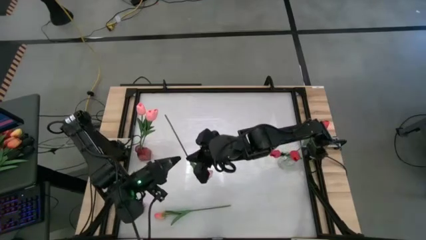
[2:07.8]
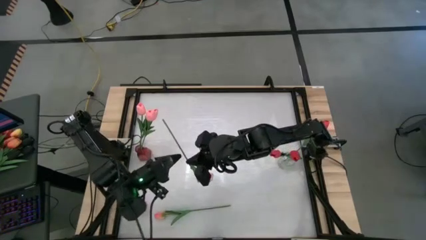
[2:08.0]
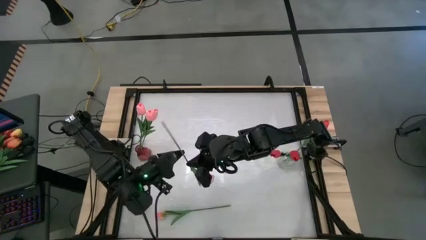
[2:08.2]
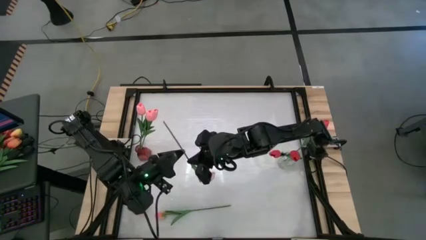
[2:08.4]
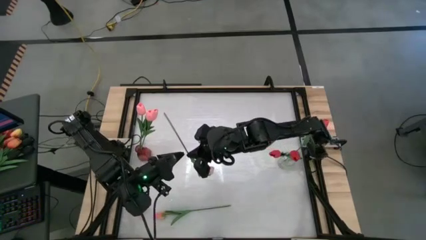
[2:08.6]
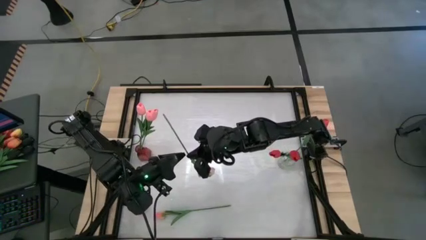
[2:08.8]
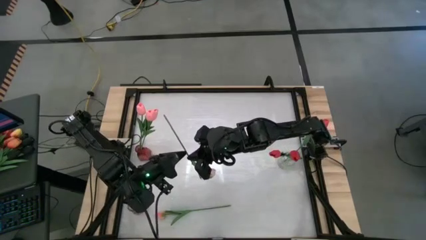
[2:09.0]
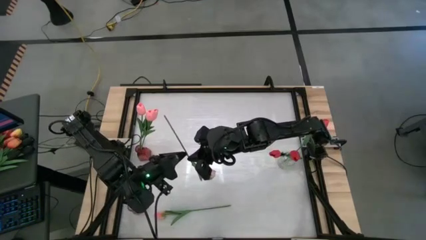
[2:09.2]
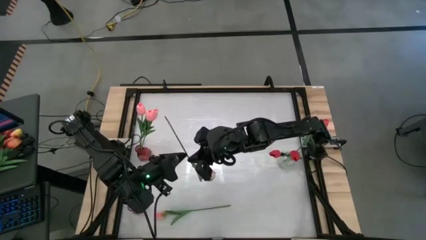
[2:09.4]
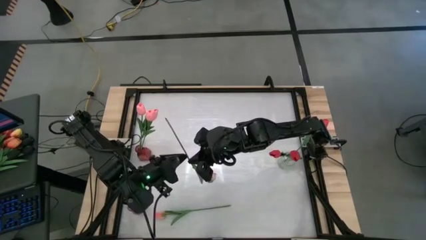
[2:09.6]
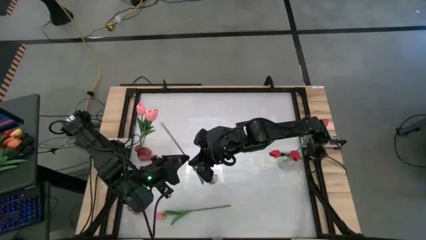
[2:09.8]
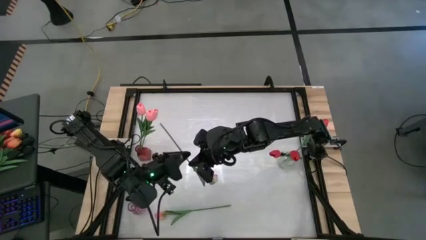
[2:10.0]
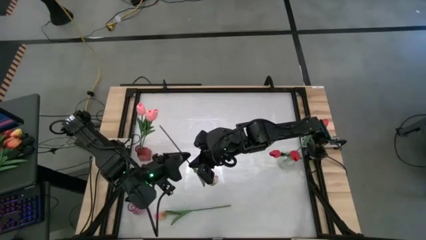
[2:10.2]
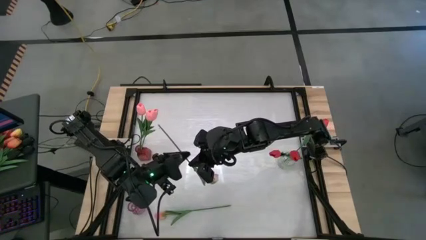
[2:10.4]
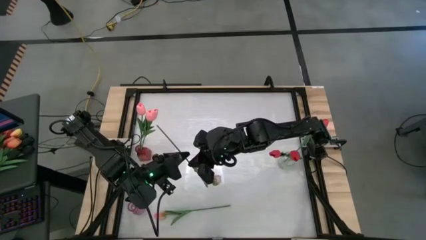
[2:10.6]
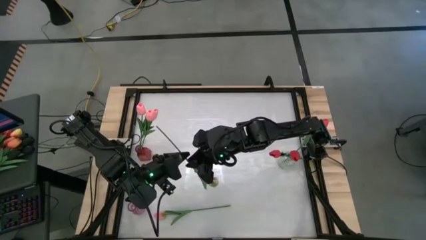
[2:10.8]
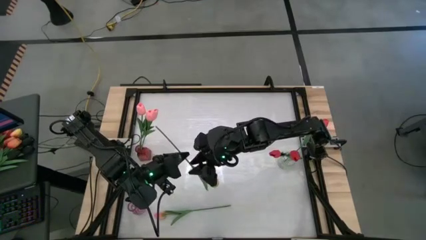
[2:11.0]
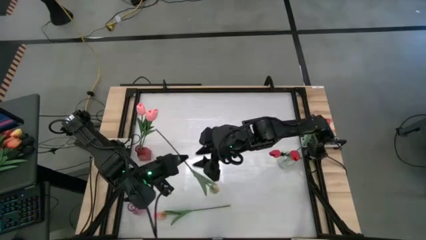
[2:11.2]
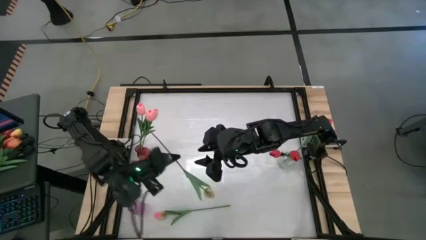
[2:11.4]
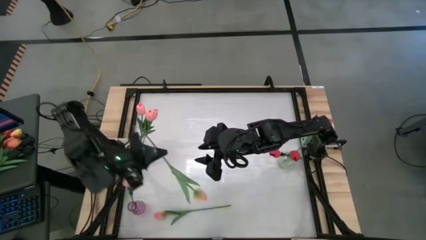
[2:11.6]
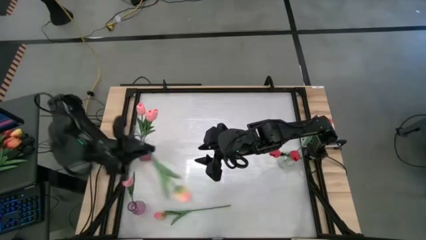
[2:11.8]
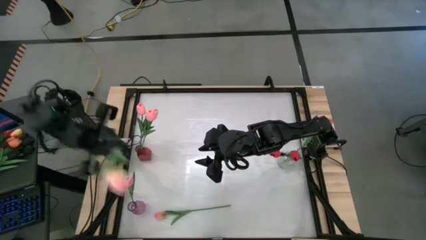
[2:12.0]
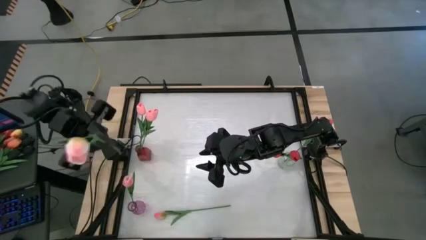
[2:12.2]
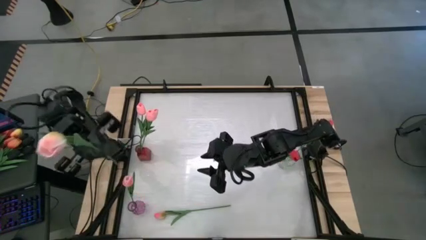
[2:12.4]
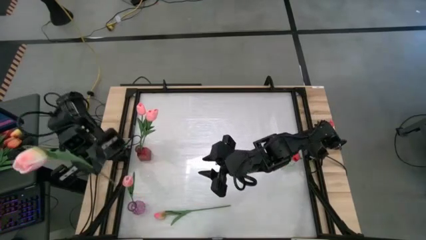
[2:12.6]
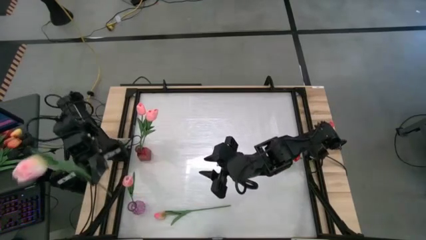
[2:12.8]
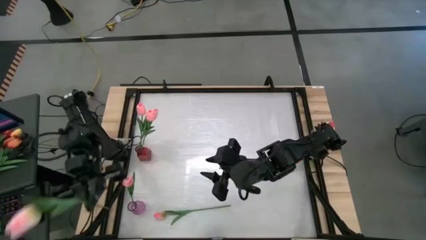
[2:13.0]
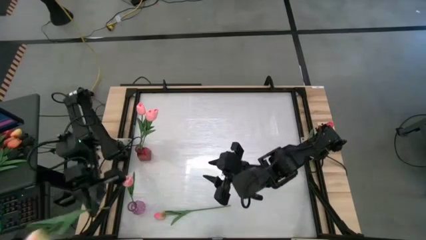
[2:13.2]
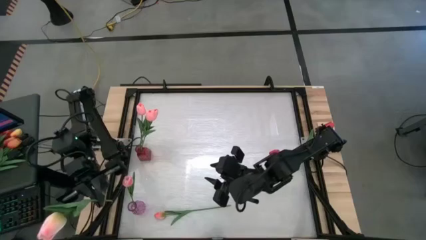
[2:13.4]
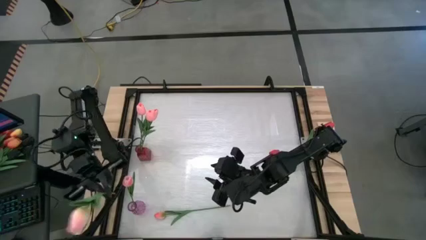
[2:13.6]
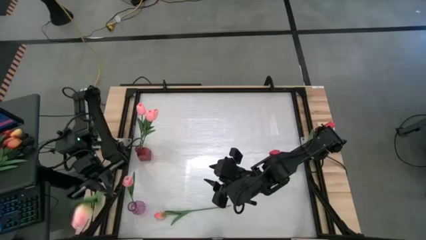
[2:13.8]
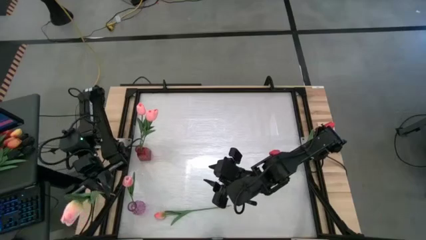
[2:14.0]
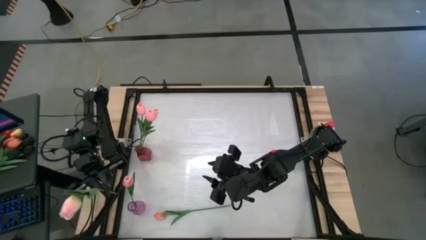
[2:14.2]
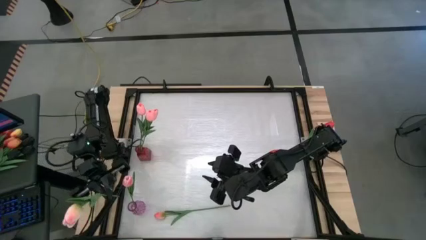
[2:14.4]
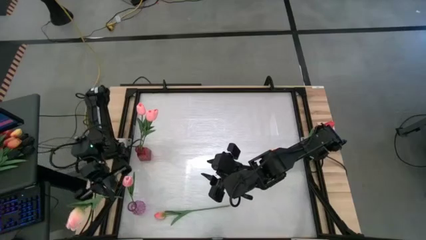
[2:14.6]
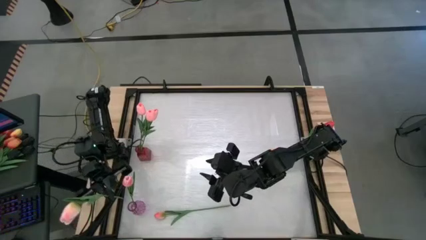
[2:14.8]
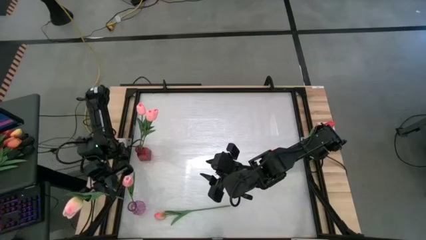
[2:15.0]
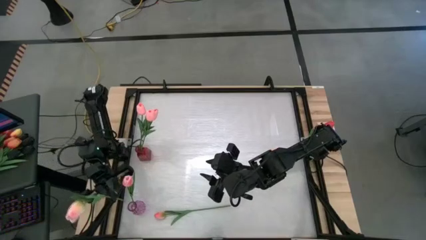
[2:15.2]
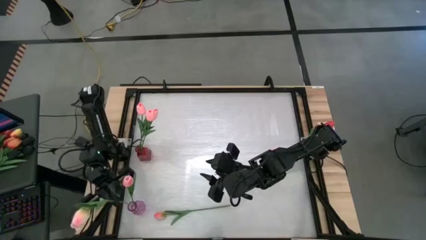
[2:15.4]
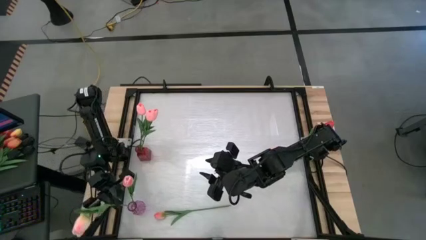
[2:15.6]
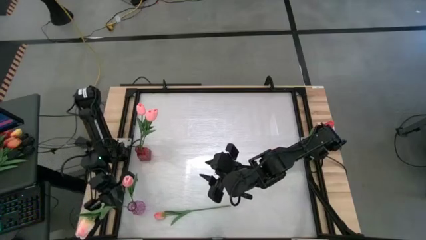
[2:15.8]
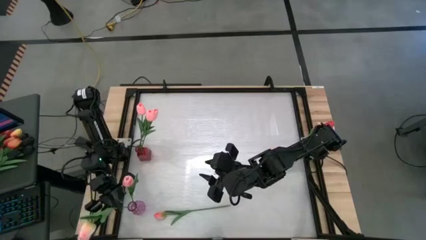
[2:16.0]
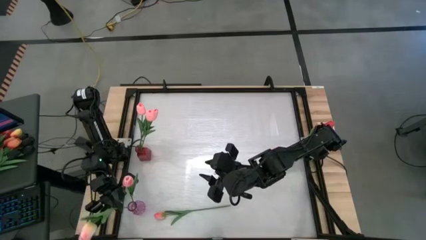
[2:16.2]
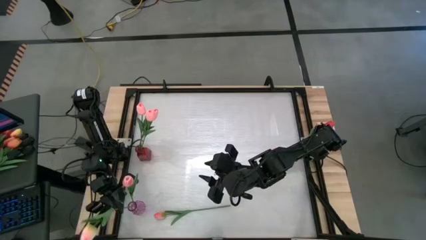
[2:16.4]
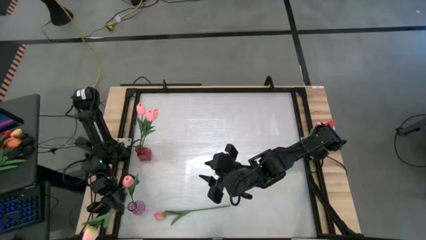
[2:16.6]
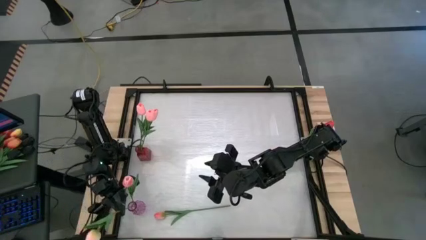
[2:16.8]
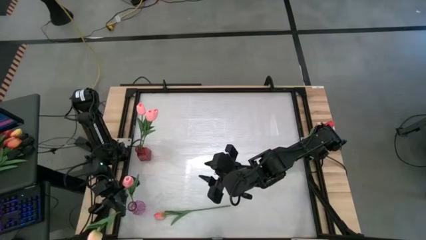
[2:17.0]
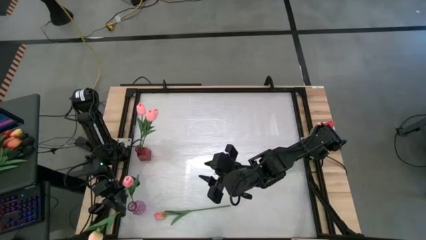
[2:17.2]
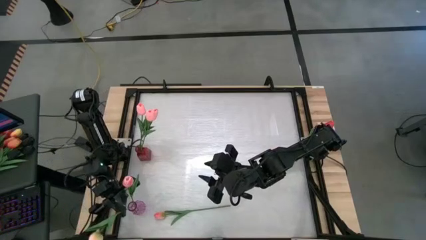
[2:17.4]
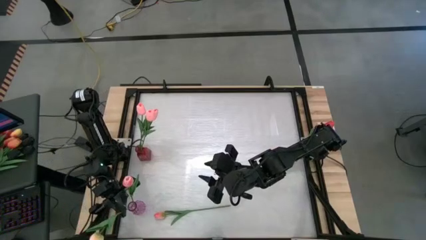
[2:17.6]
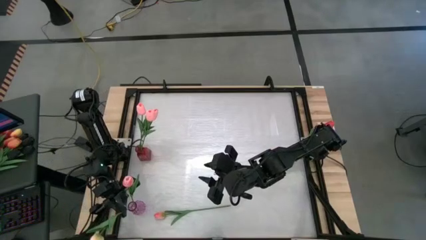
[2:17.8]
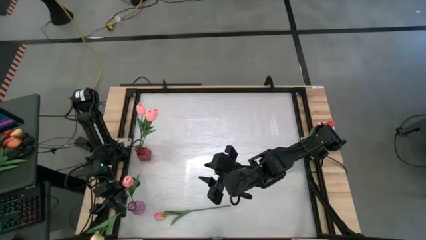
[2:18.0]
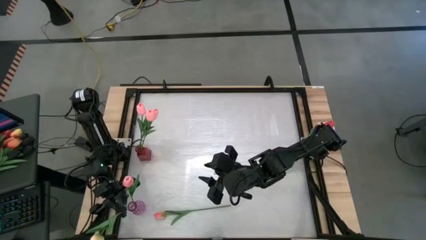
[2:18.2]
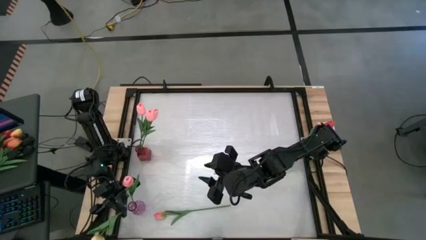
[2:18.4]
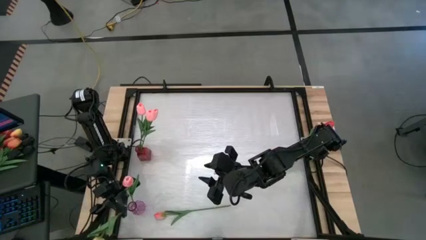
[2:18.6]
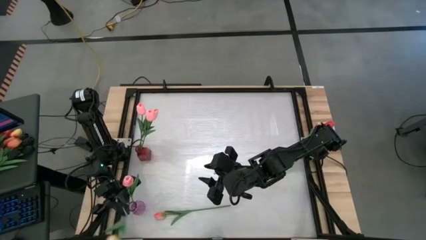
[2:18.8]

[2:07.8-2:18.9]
Task: Sort flowers into vase by color
Put the right light pink flower into the purple flower vase
